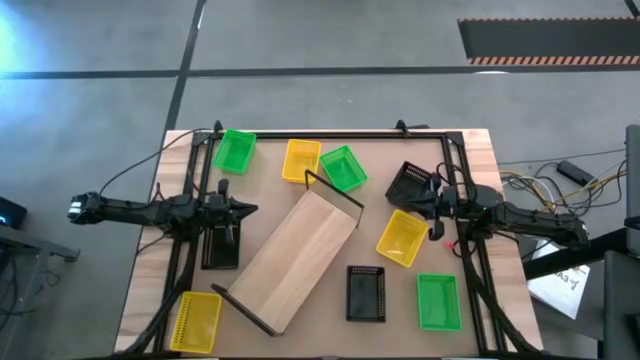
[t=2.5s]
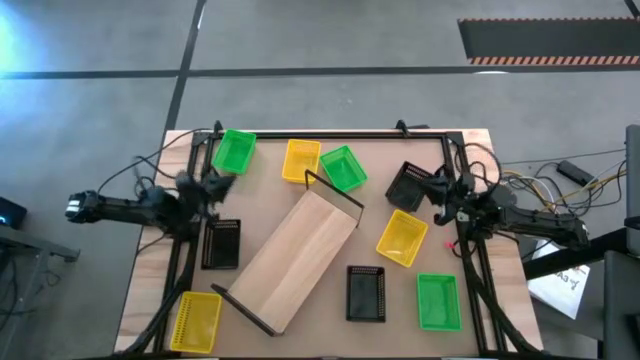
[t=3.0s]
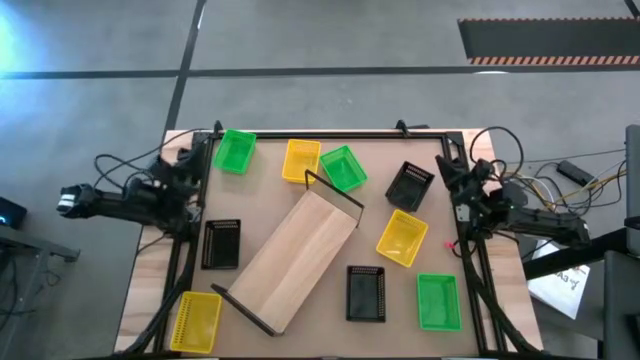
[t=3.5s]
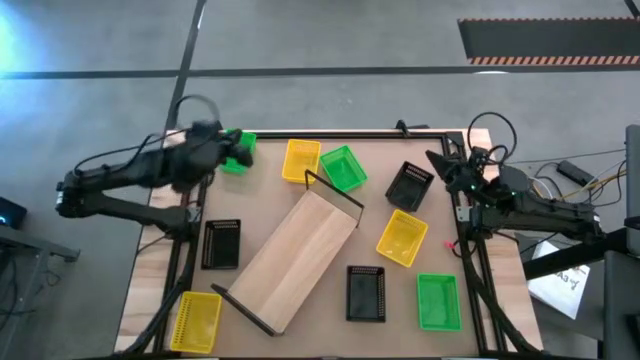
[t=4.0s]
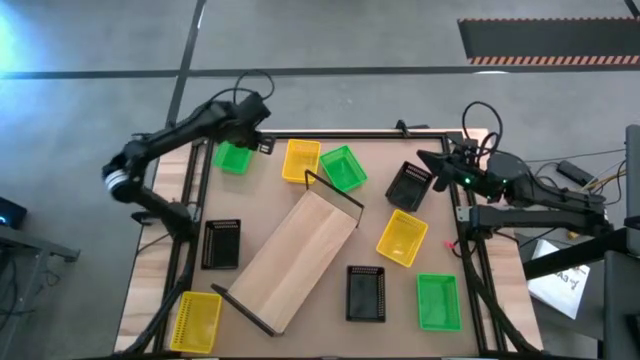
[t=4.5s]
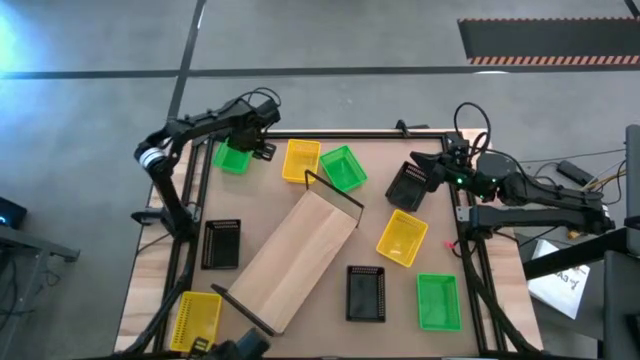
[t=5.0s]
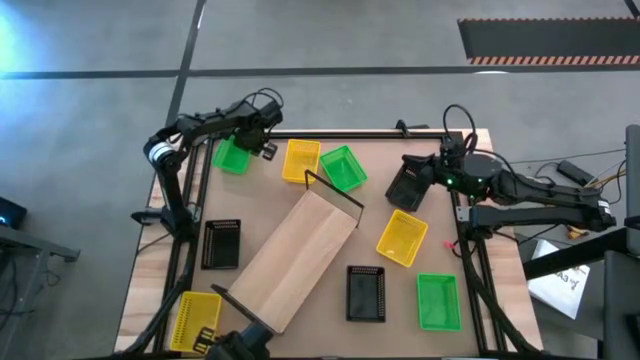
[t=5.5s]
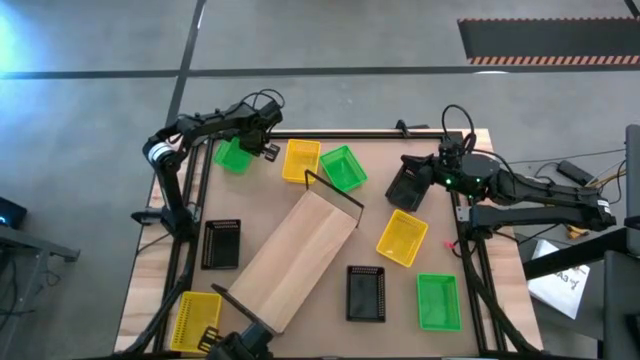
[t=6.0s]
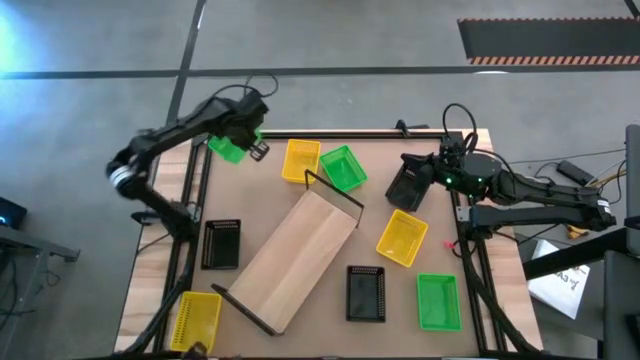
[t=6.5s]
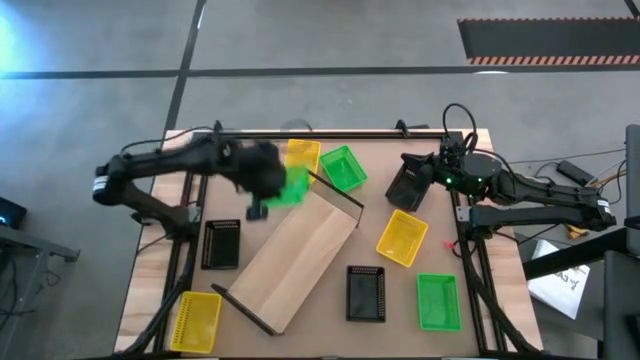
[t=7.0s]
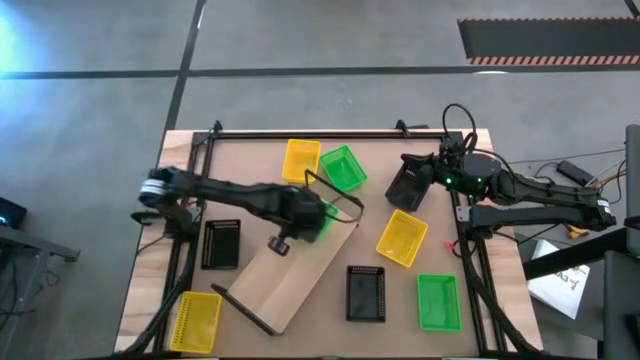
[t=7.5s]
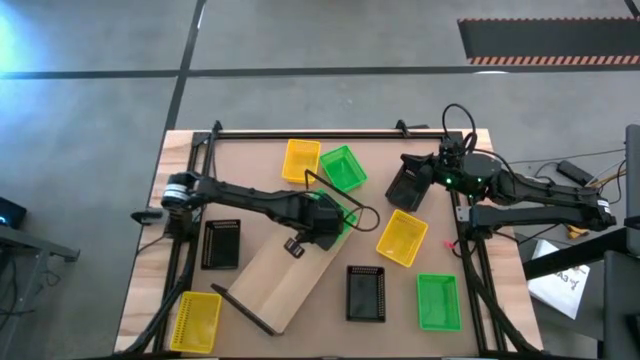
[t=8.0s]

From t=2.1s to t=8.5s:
Task: Stack baskets on shelf by color
Put the top left green bin on the shelf

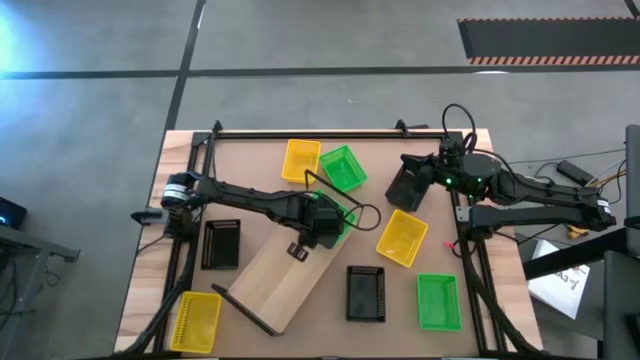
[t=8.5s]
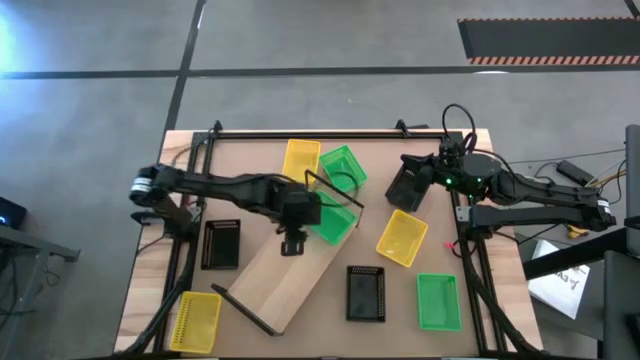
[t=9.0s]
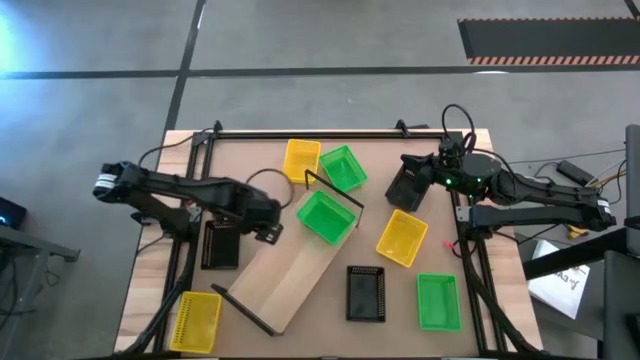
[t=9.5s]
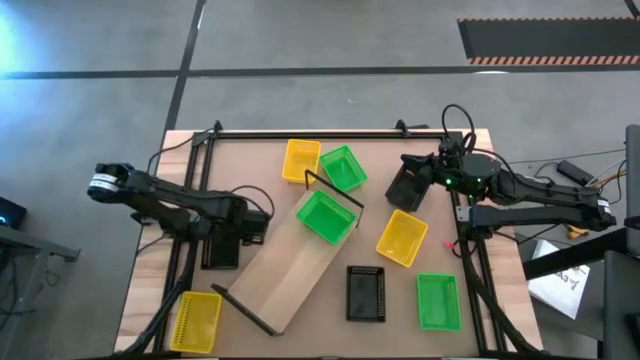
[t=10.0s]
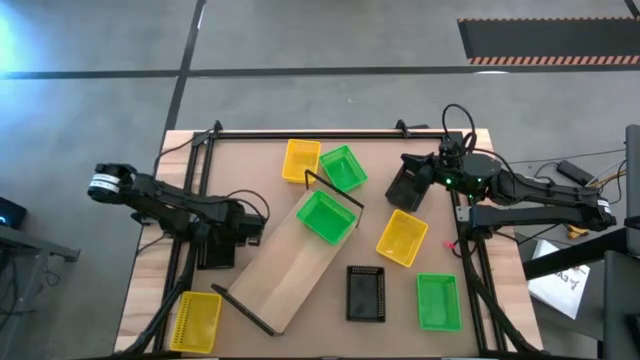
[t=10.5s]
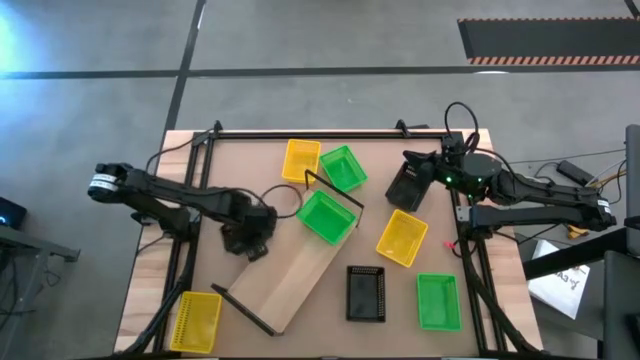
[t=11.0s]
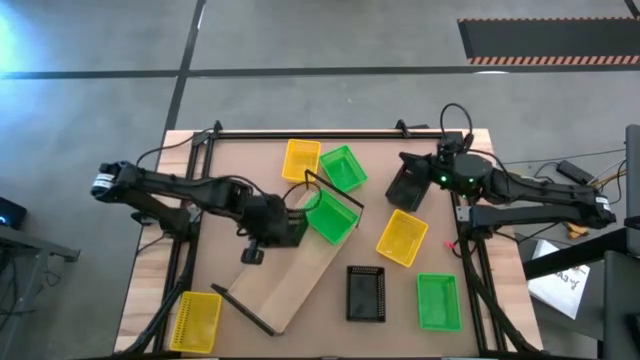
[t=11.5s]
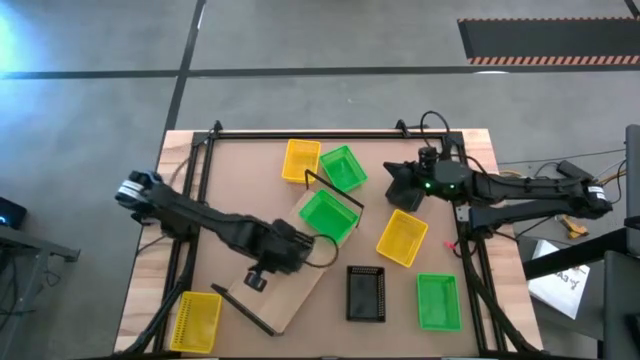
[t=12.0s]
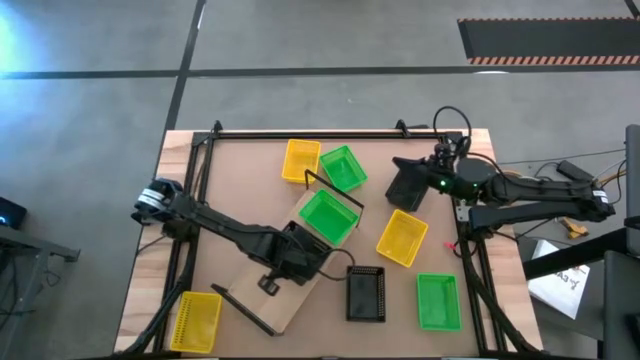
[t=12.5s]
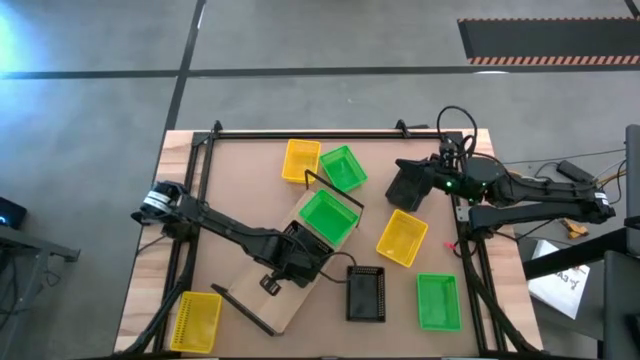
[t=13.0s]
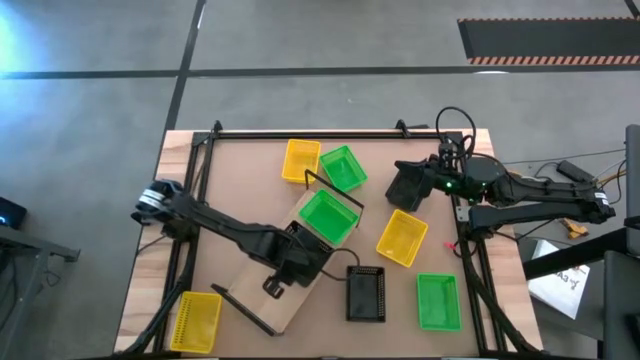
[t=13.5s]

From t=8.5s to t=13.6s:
Put the left black bin on the shelf

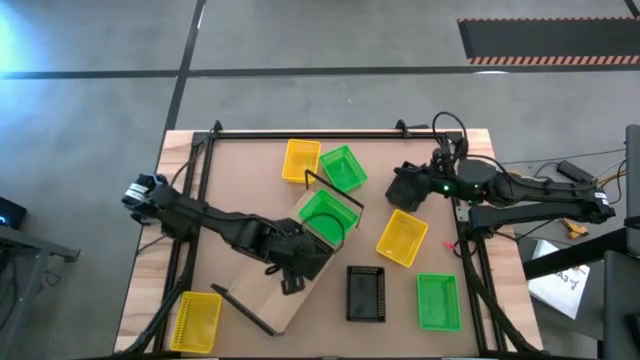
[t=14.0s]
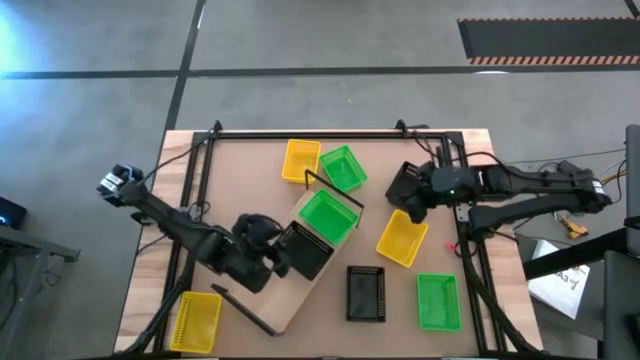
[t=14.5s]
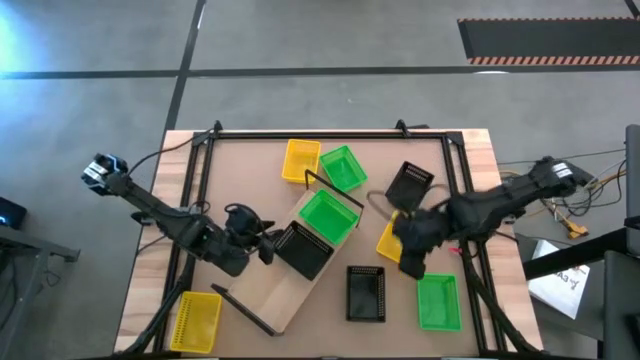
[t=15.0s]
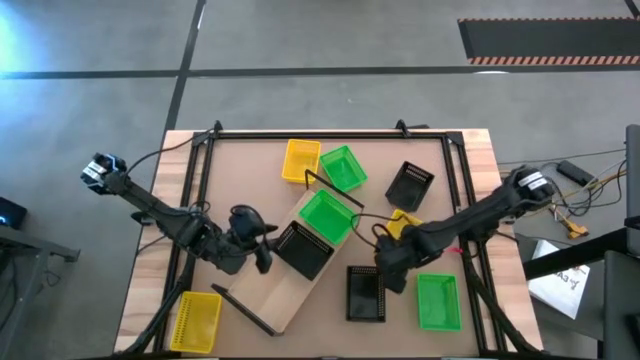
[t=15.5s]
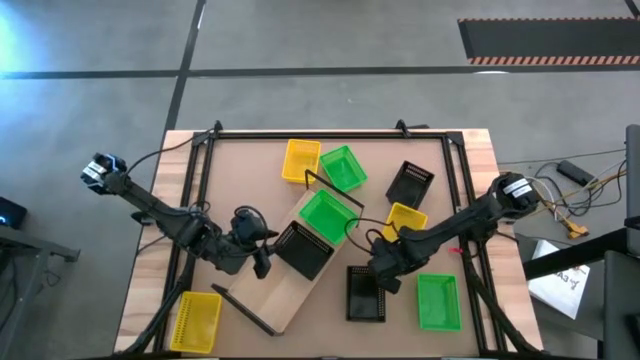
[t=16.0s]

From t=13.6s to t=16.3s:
Put the middle yellow bin on the shelf

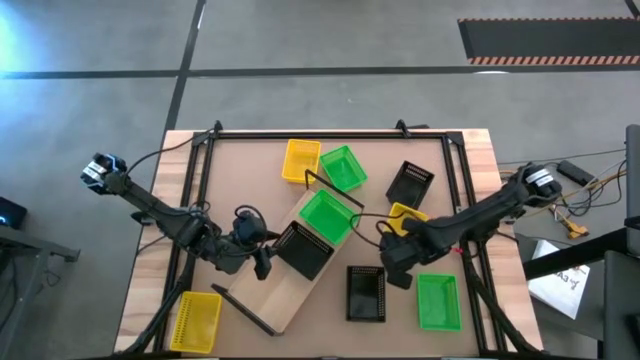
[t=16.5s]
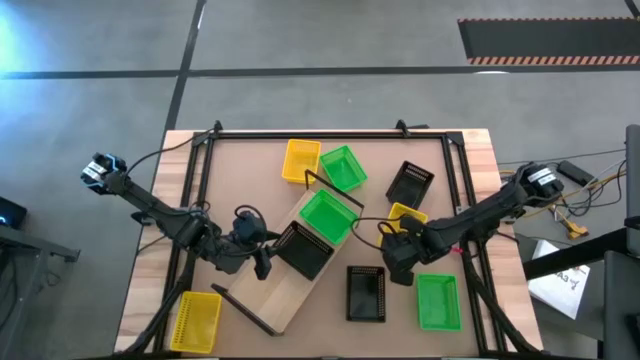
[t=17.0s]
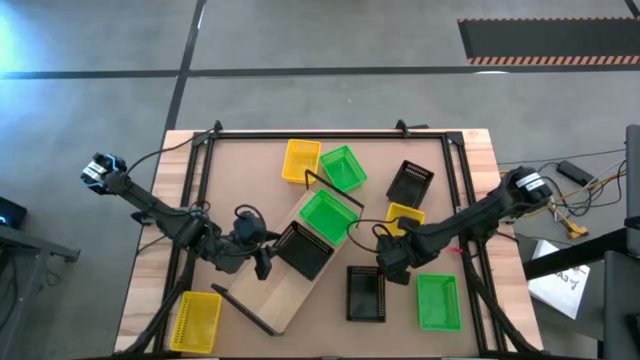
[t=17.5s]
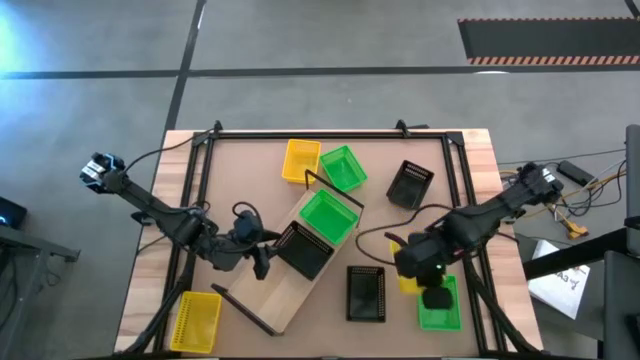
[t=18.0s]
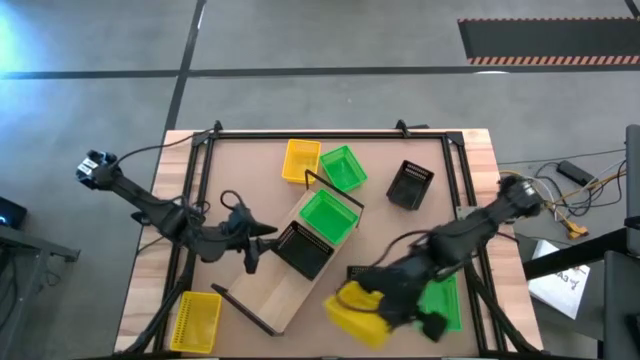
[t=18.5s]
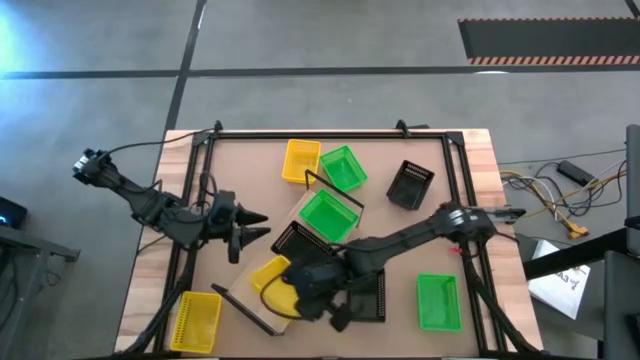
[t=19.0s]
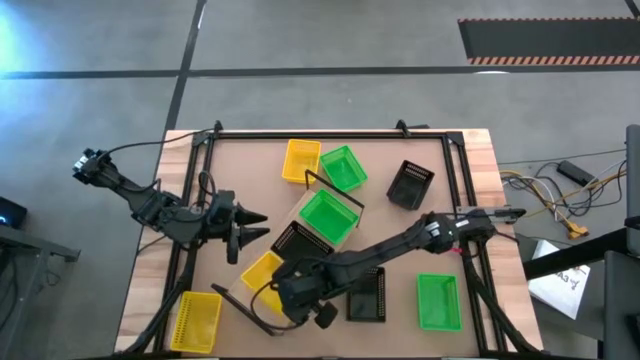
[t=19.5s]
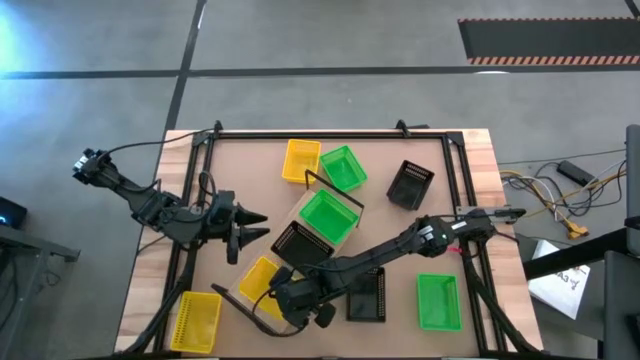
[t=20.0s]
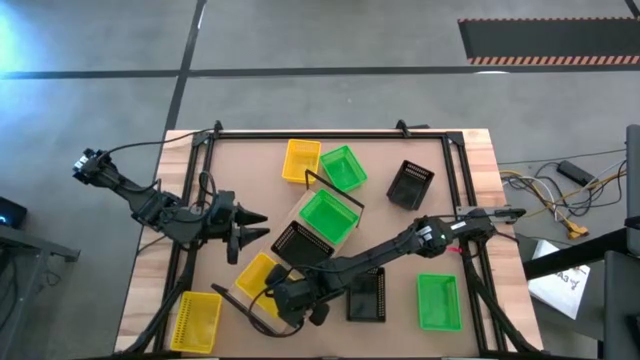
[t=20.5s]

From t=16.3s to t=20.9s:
Put the middle yellow bin on the shelf

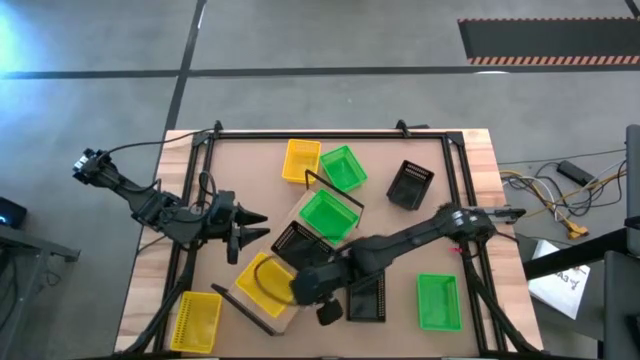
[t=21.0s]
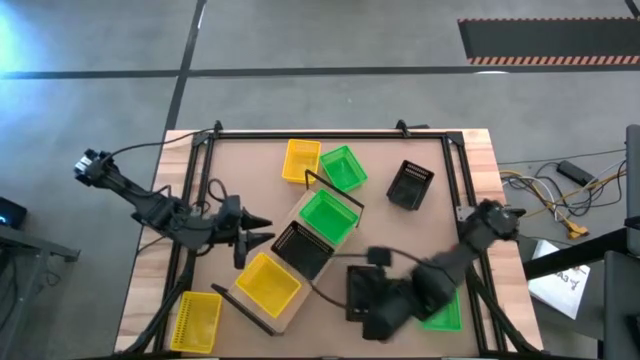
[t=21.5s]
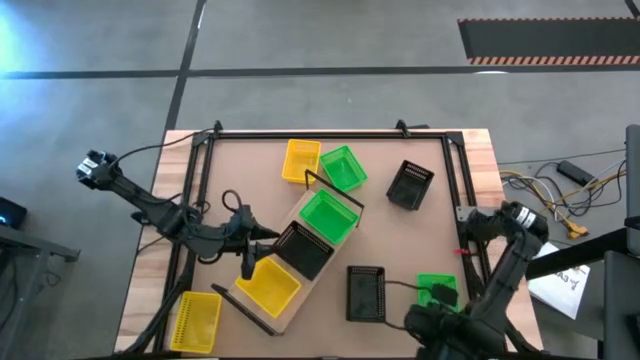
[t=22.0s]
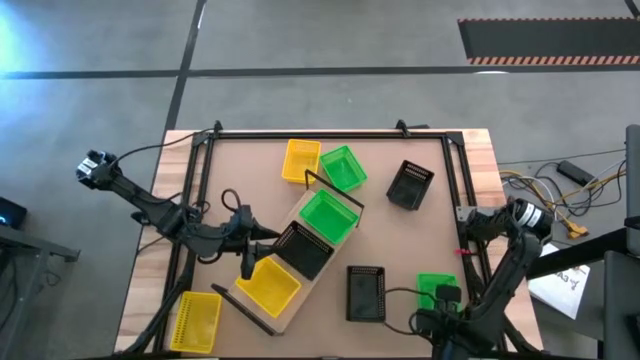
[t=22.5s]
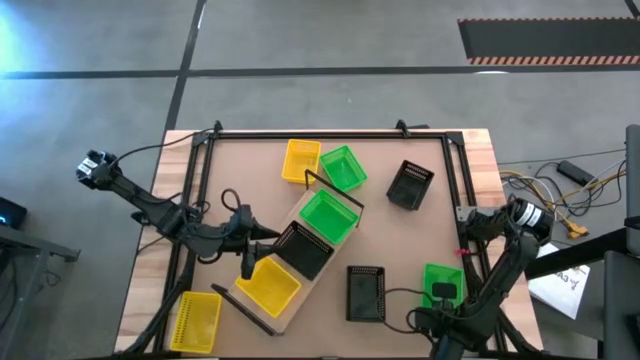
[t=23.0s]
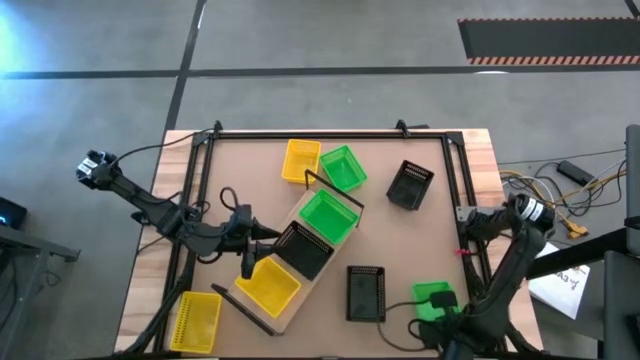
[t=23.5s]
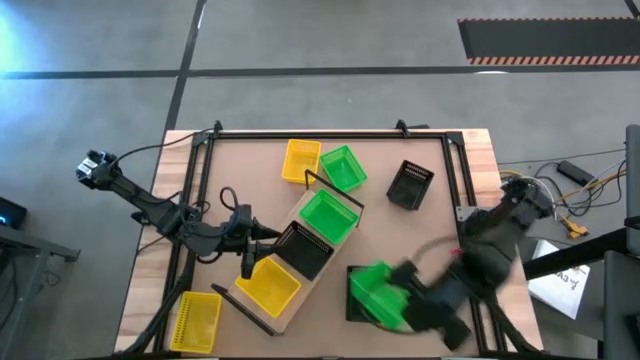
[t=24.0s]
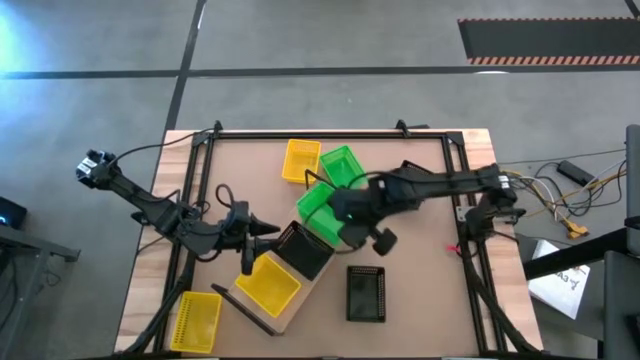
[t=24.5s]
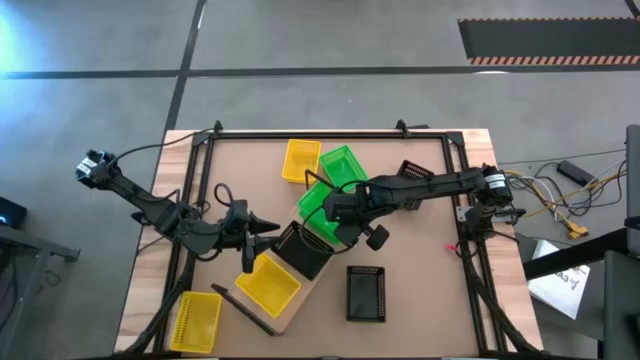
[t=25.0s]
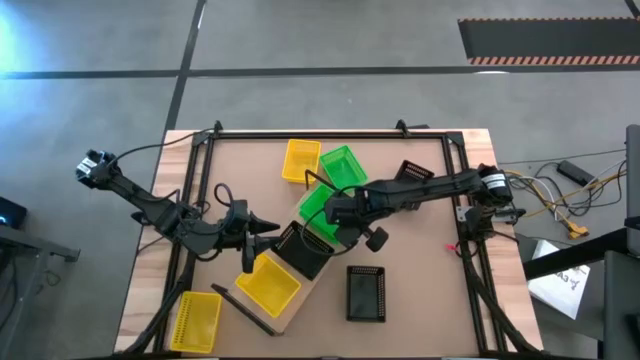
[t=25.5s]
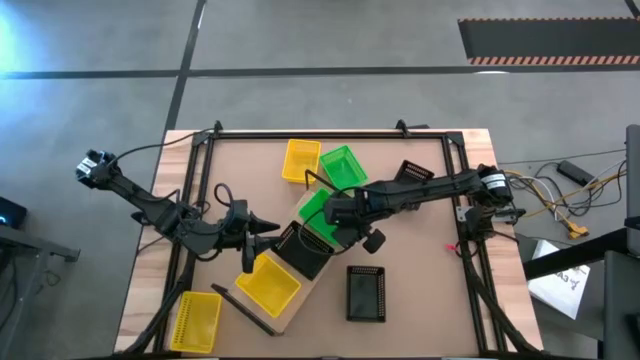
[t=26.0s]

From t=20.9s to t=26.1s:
Stack the bottom green bin on top of the green bin on the shelf
